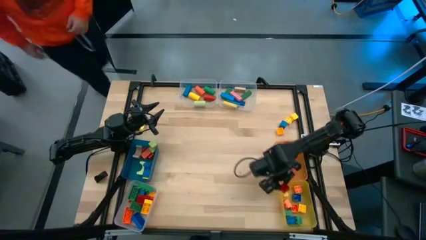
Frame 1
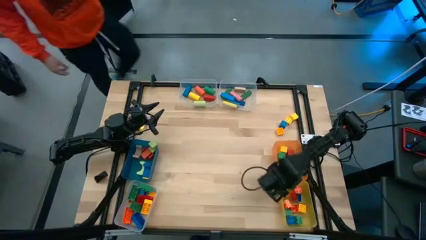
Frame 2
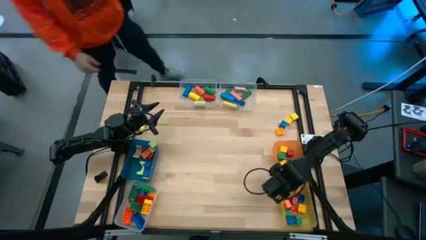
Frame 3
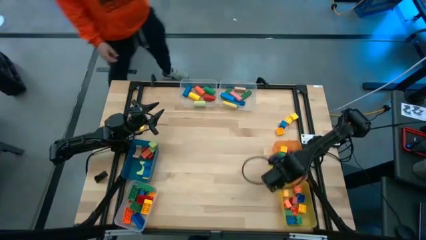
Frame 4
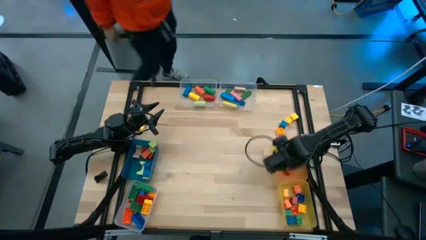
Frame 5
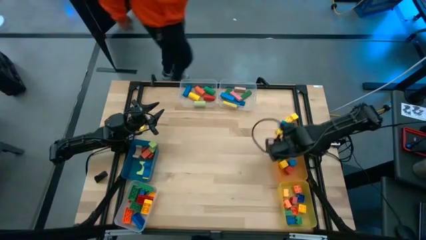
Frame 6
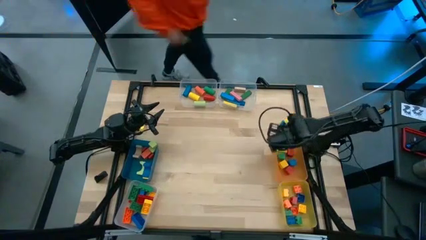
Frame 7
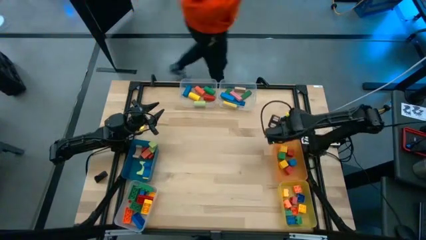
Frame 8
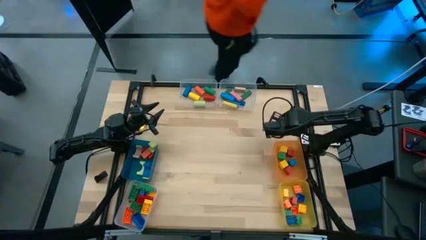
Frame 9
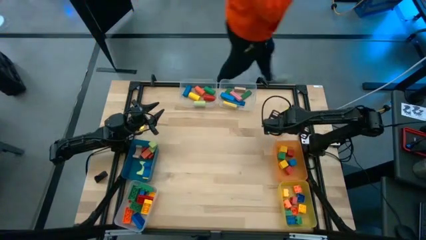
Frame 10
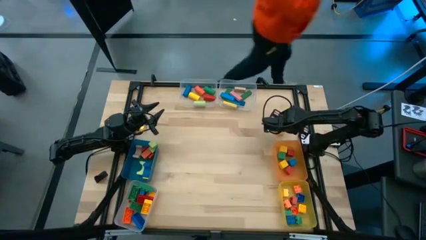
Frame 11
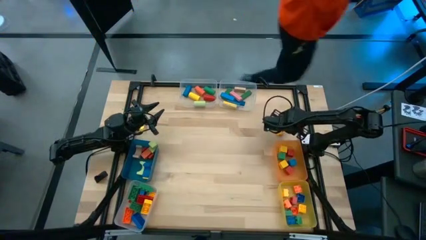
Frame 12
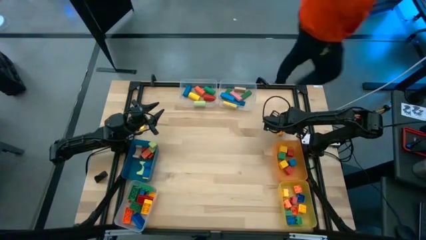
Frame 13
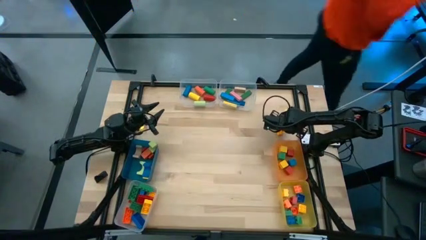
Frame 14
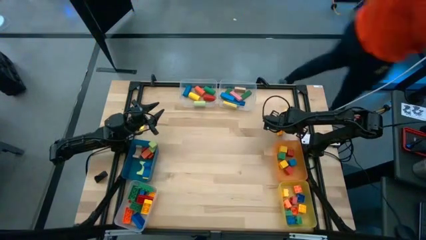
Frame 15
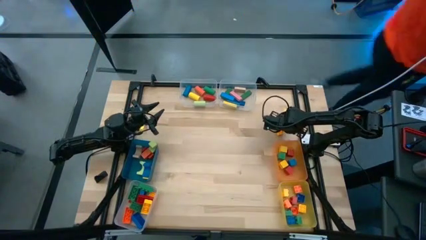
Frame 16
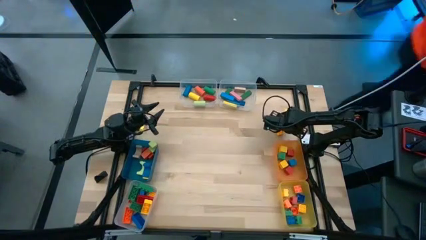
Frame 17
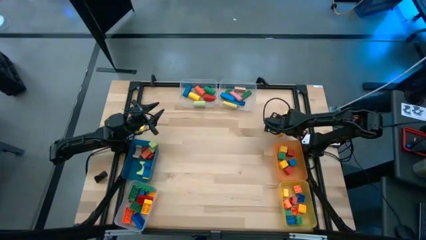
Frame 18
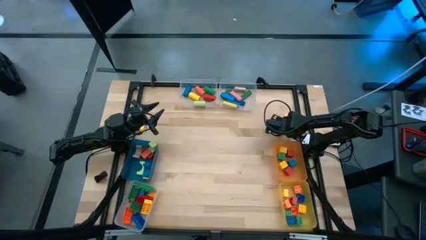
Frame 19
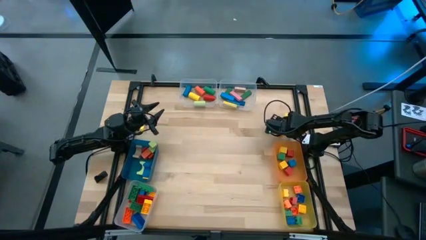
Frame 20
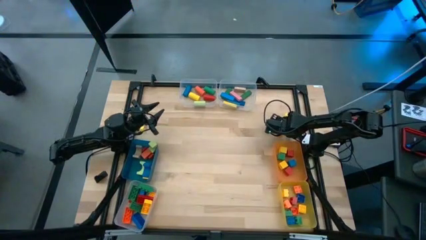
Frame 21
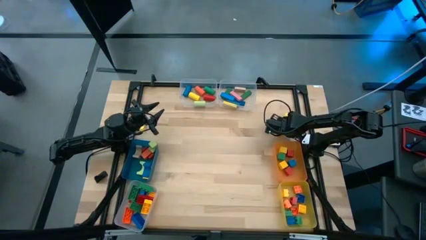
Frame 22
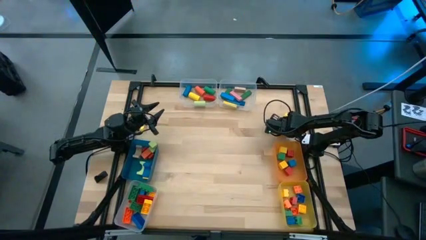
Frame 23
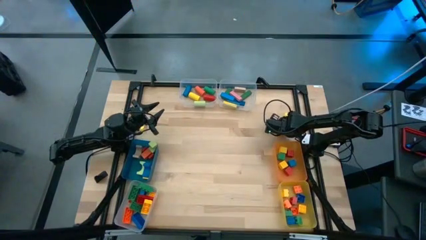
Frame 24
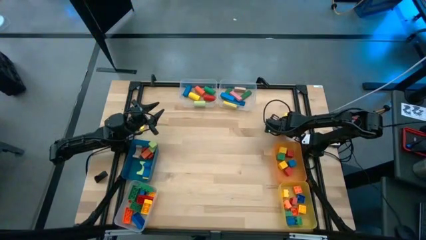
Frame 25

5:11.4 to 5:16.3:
Task: Sort blocks by size
Put the blue block into the orange bin

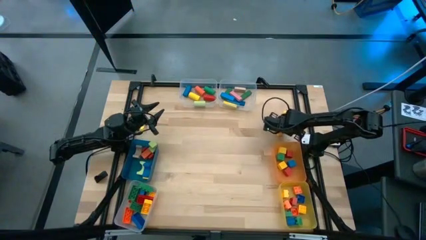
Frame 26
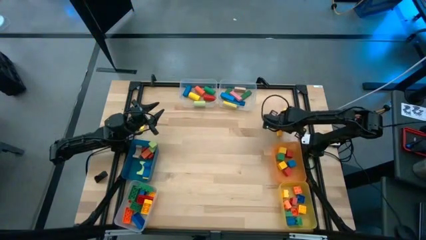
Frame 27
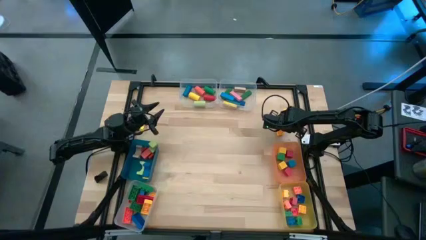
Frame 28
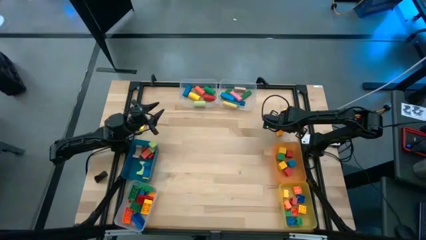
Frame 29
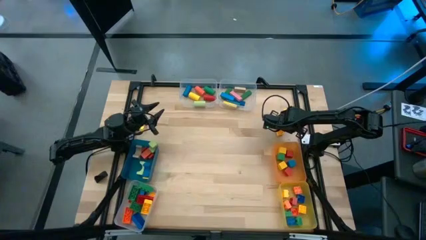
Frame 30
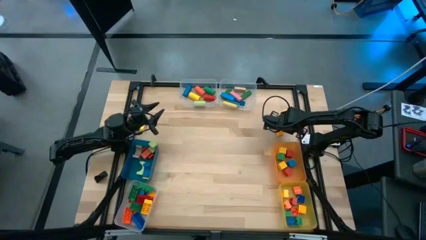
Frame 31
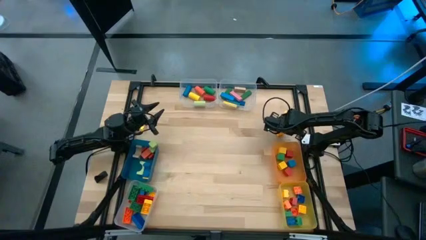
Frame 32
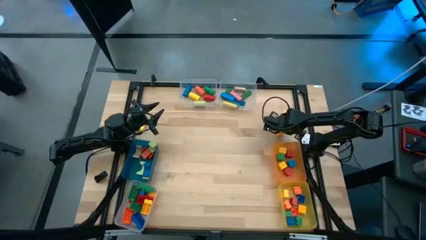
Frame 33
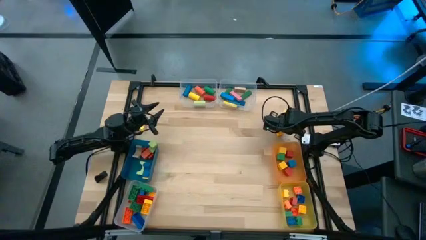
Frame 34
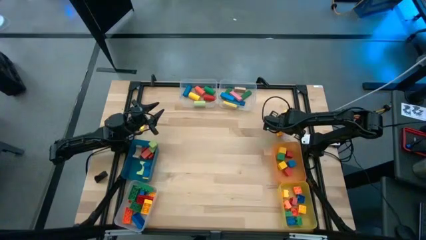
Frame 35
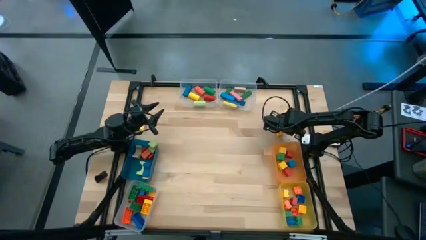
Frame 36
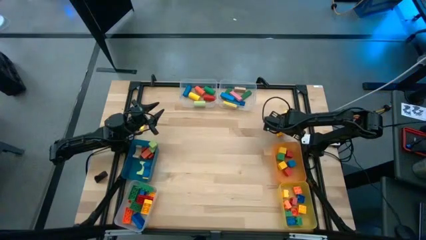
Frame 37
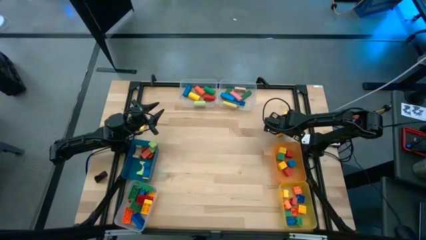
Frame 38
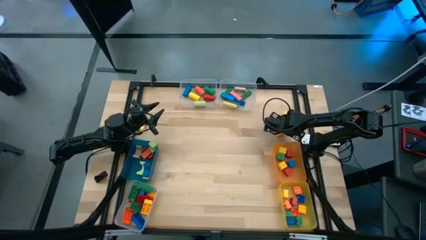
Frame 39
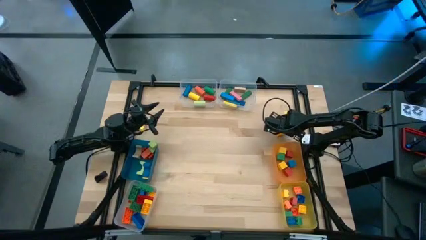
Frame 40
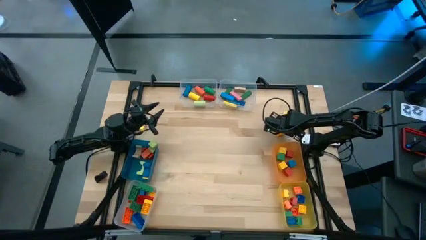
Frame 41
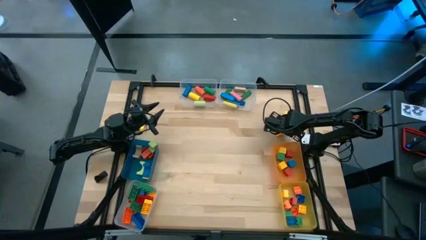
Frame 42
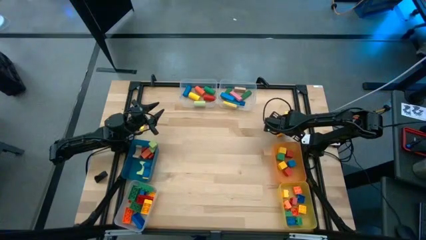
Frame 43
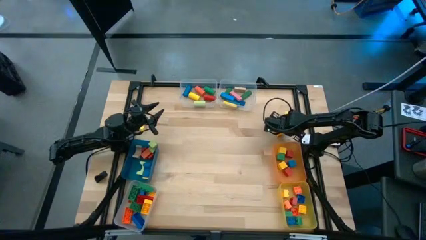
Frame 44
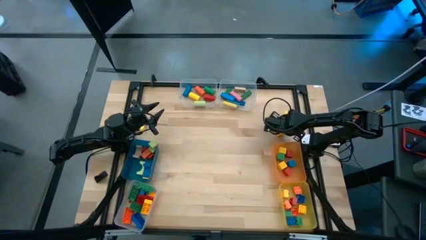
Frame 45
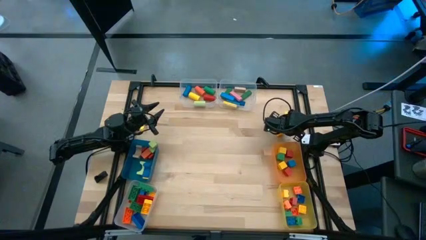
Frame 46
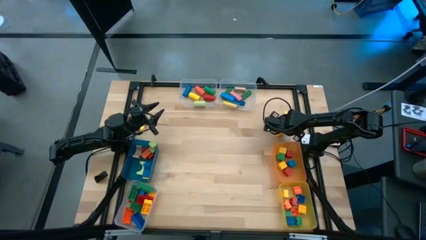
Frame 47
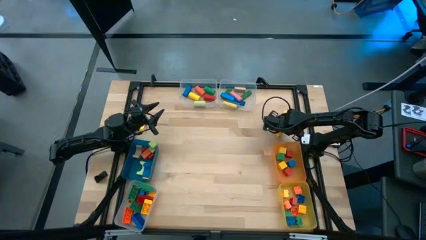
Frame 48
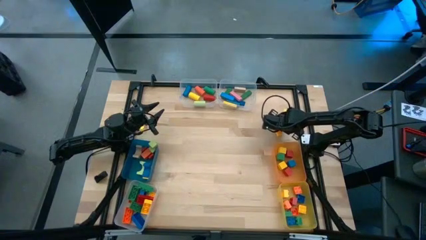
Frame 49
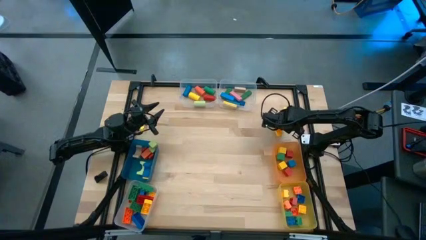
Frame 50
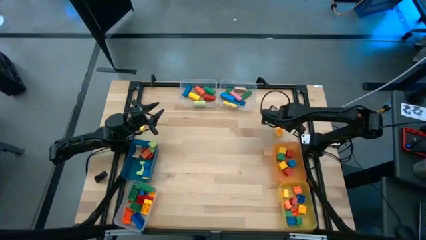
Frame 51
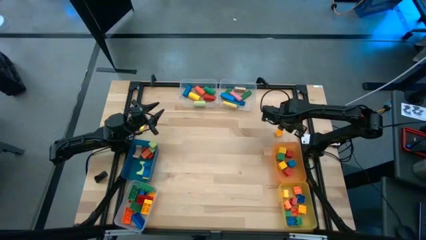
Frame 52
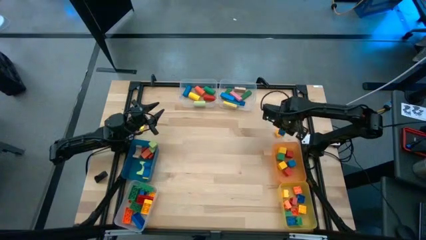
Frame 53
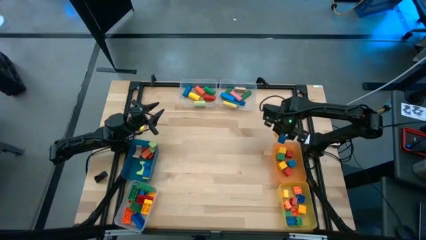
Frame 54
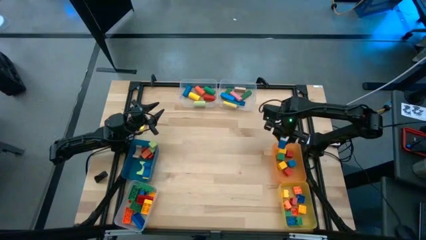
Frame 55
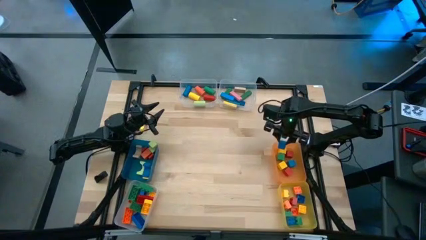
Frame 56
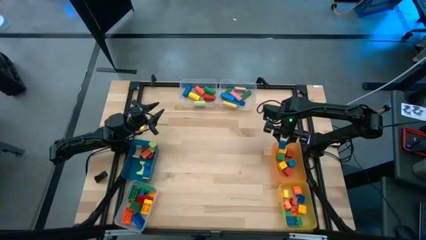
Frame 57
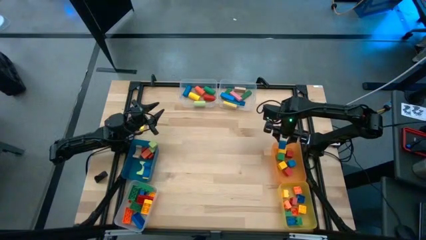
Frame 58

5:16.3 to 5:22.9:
Put the blue block into the orange bin

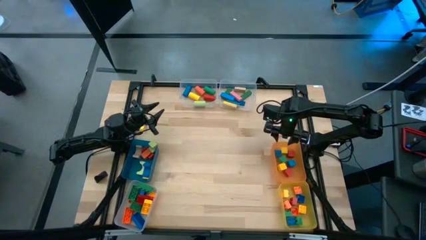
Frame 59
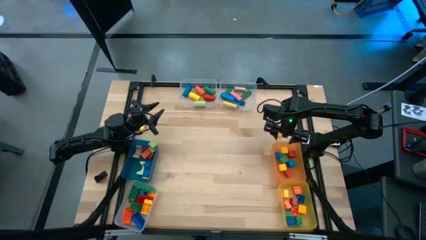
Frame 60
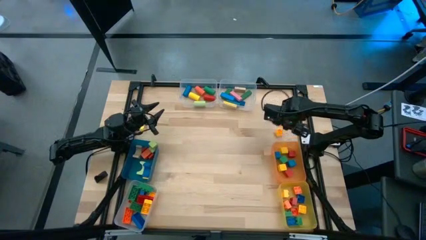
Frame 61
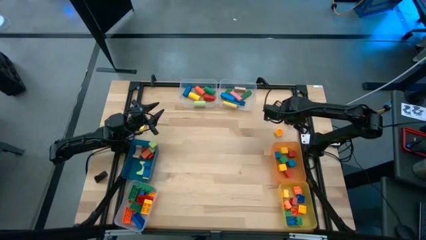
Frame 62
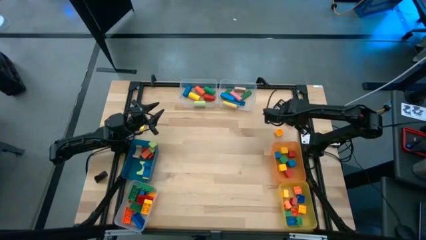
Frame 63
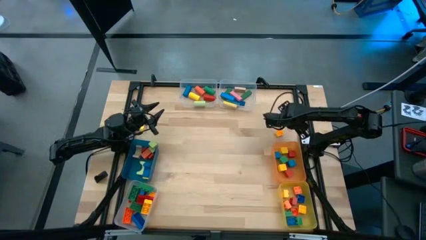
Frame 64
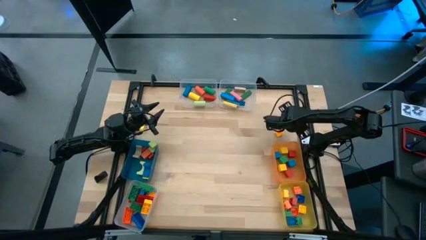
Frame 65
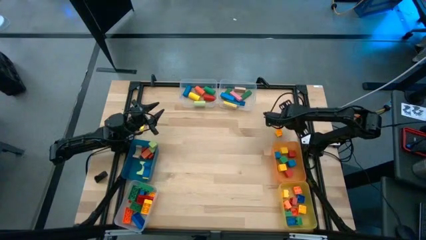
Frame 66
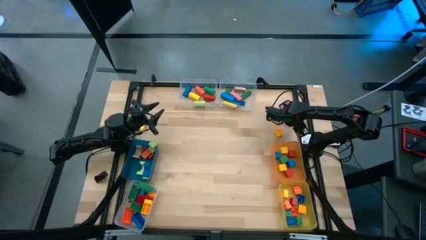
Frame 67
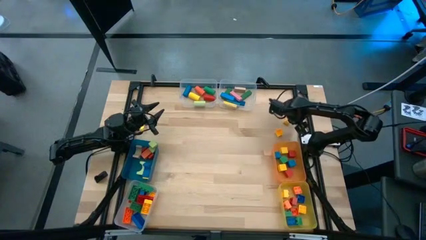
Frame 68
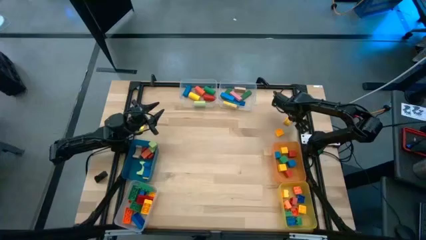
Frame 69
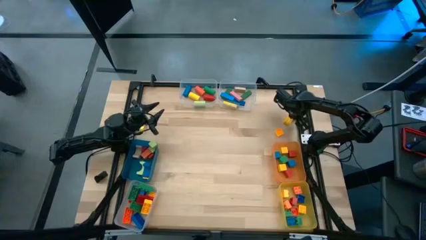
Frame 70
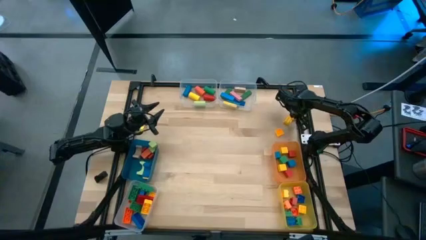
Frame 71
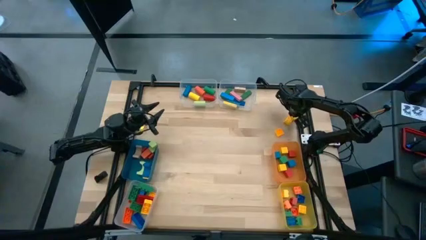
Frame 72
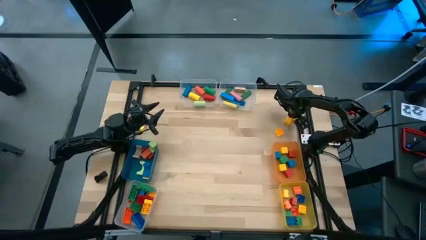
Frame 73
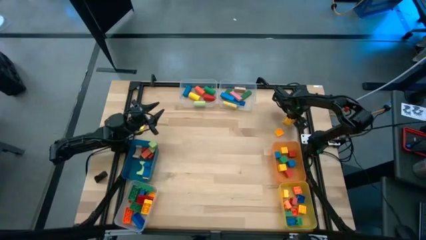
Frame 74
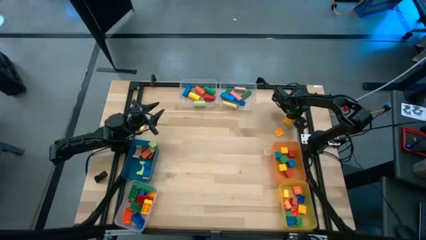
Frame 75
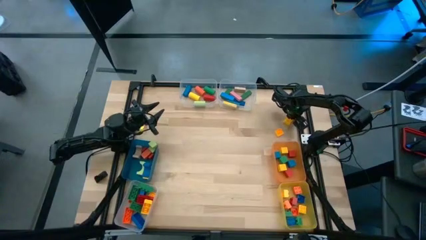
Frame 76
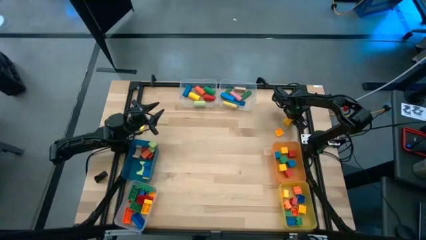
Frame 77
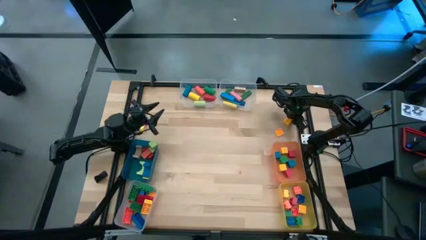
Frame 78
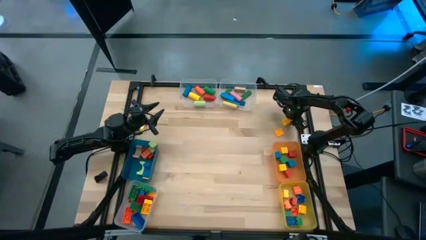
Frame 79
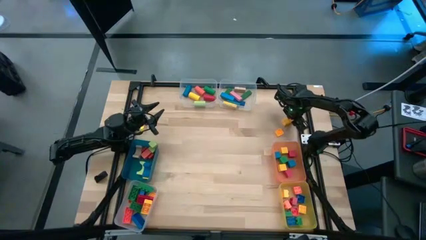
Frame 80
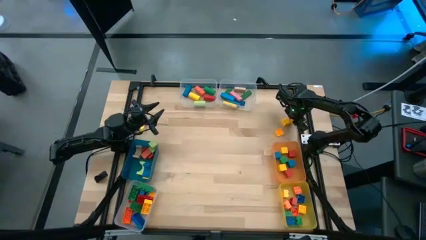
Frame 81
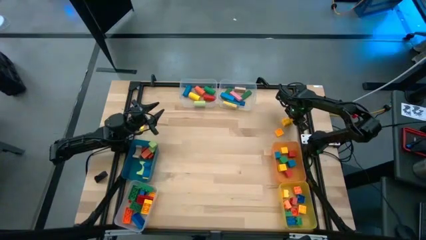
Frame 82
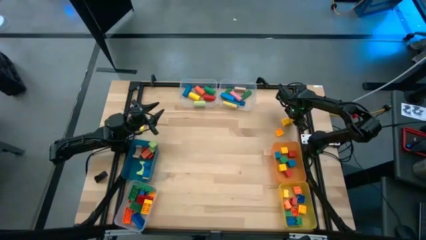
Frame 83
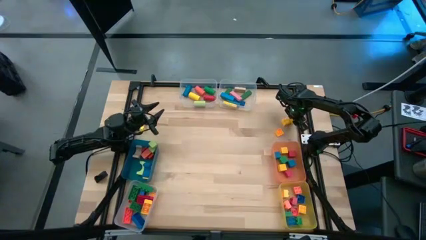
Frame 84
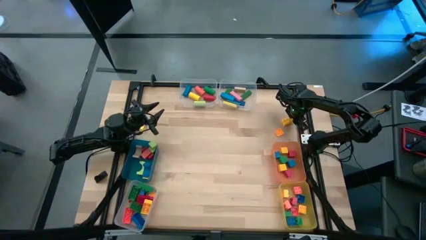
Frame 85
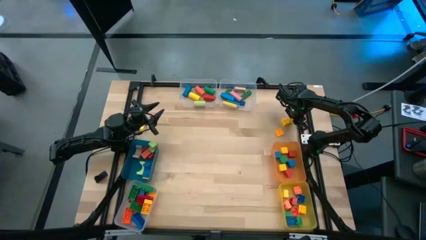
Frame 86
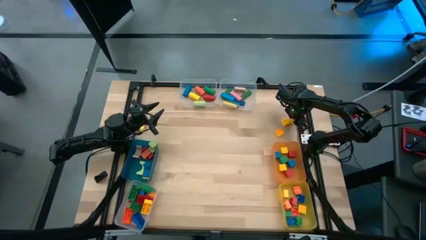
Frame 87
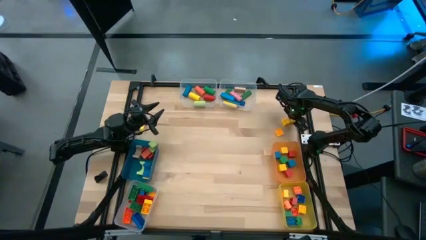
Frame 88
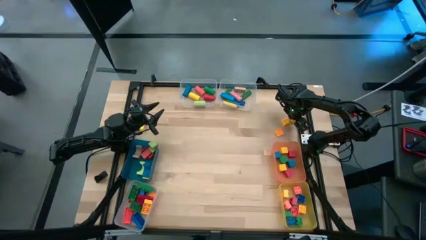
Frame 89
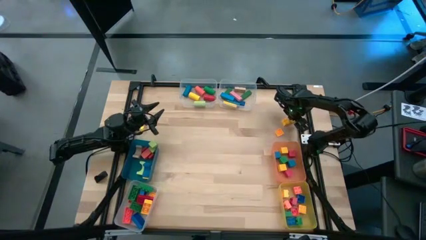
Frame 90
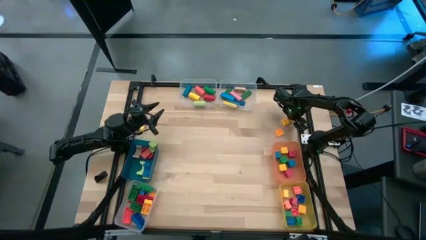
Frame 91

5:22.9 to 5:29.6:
Put the yellow block into the orange bin
